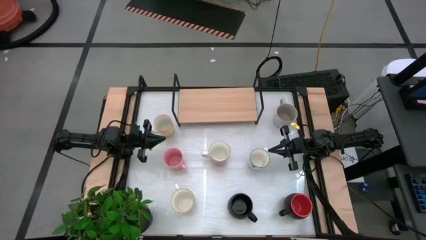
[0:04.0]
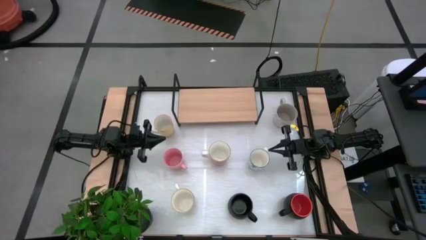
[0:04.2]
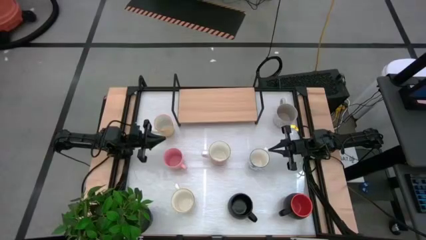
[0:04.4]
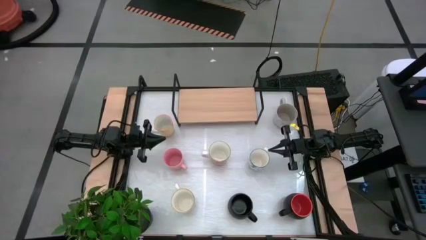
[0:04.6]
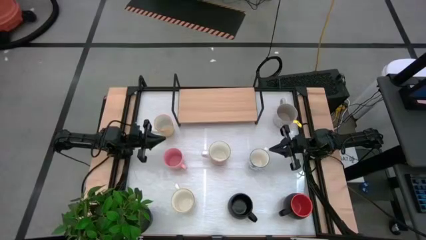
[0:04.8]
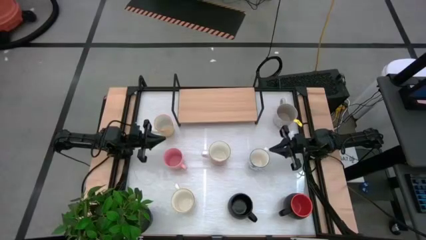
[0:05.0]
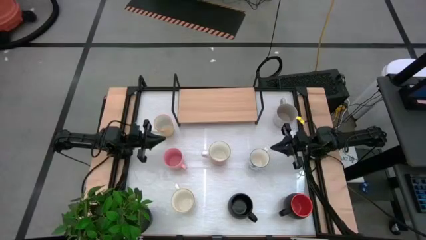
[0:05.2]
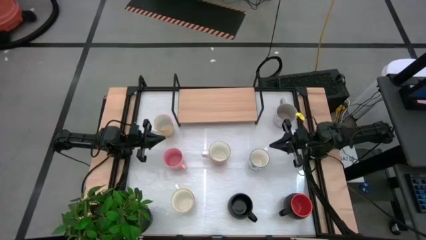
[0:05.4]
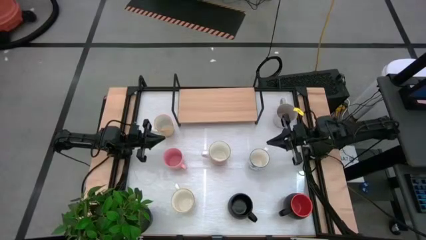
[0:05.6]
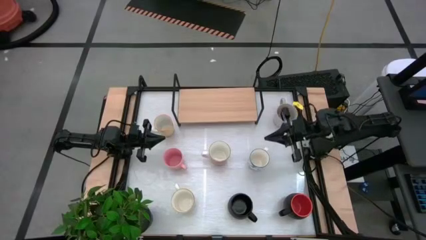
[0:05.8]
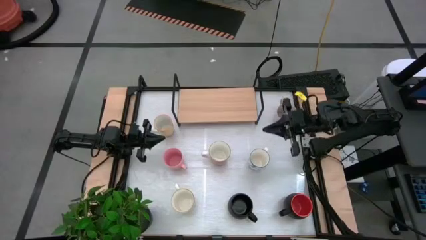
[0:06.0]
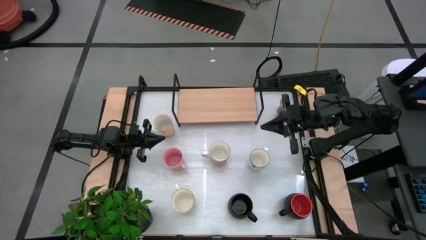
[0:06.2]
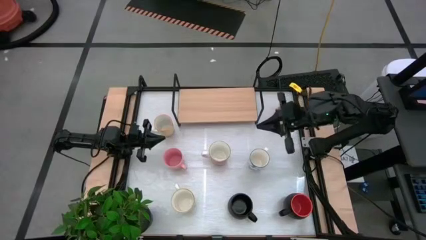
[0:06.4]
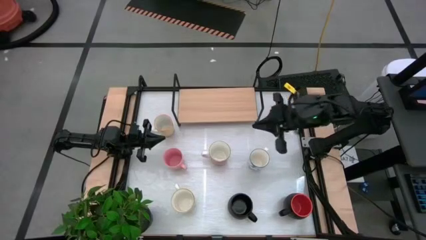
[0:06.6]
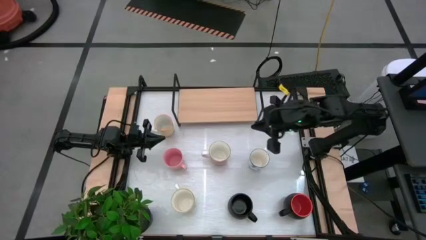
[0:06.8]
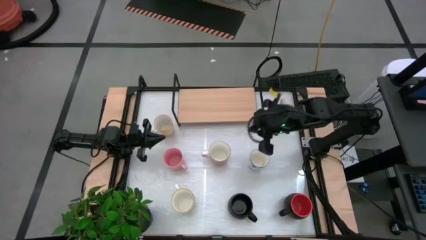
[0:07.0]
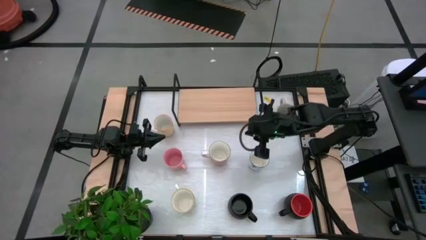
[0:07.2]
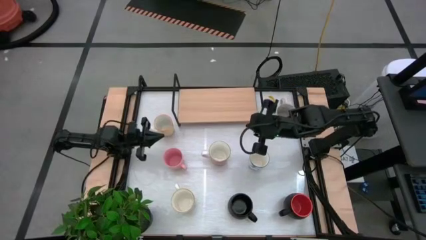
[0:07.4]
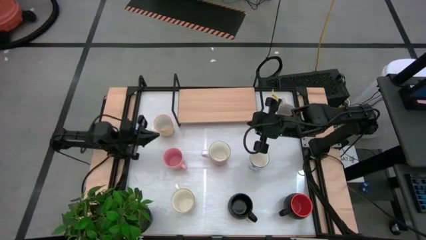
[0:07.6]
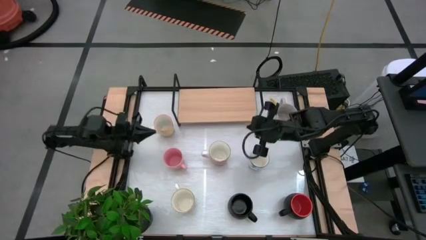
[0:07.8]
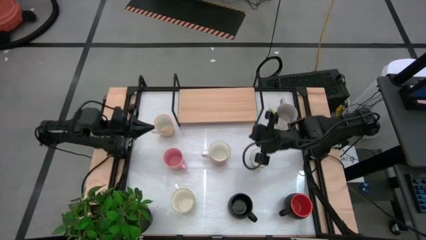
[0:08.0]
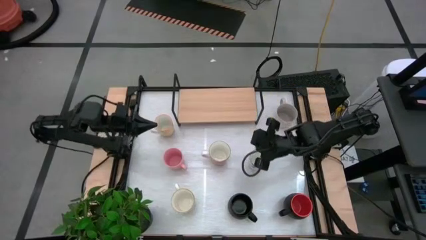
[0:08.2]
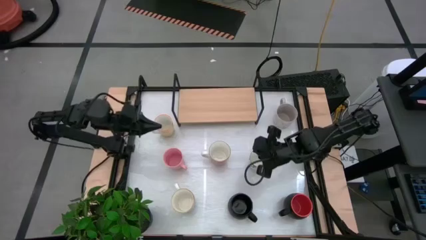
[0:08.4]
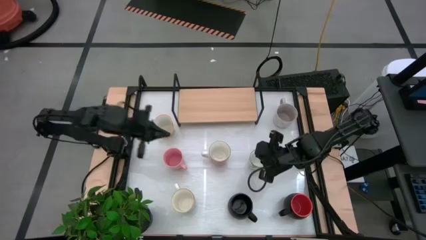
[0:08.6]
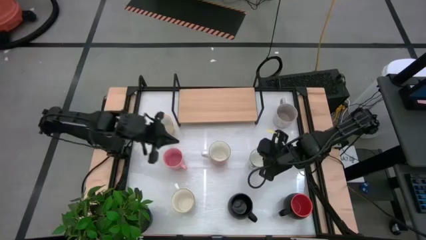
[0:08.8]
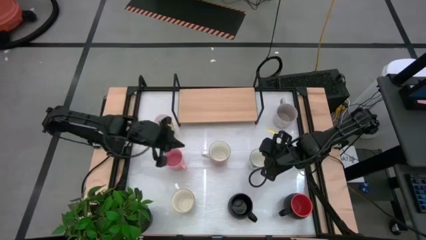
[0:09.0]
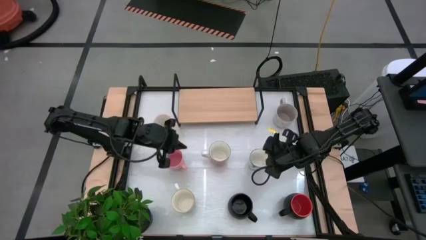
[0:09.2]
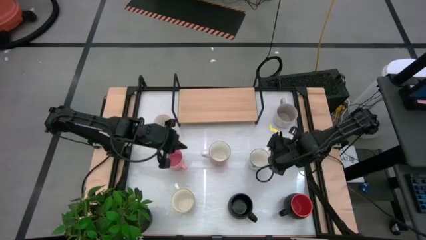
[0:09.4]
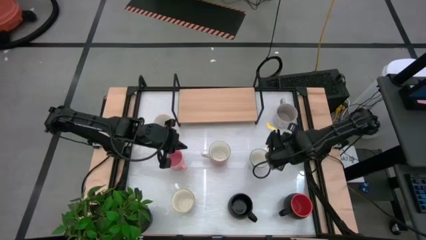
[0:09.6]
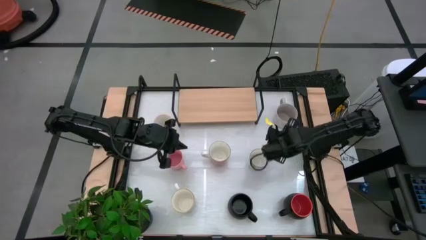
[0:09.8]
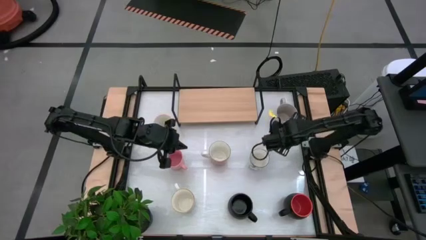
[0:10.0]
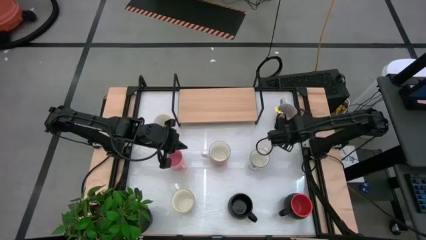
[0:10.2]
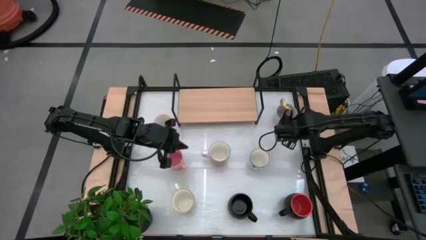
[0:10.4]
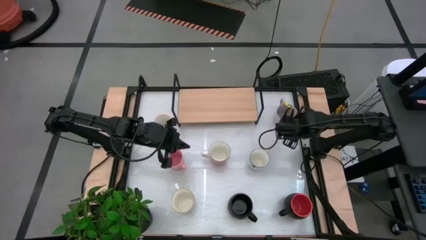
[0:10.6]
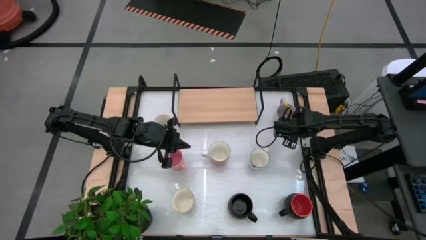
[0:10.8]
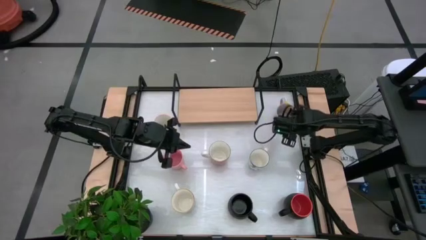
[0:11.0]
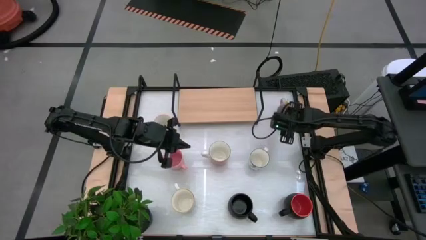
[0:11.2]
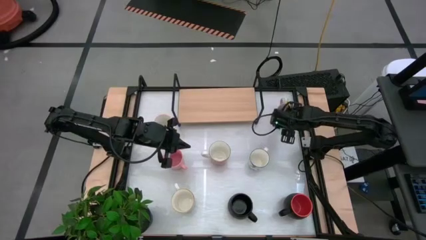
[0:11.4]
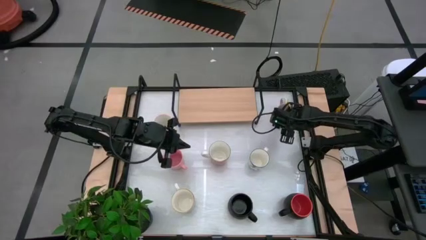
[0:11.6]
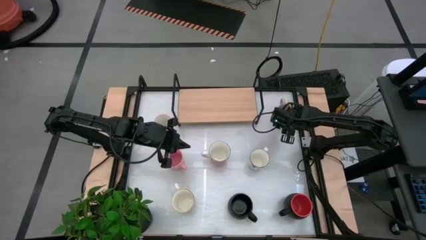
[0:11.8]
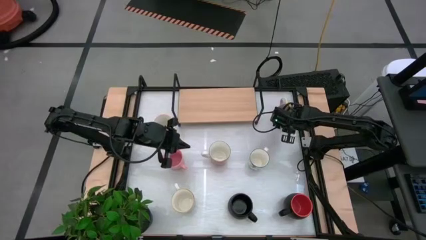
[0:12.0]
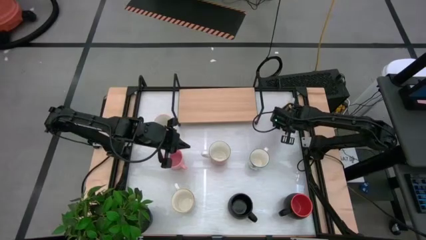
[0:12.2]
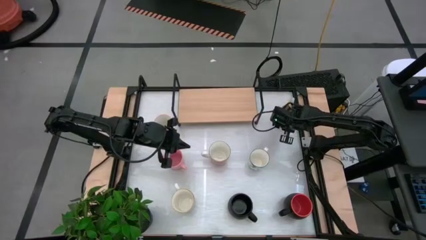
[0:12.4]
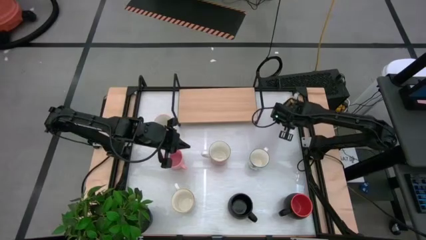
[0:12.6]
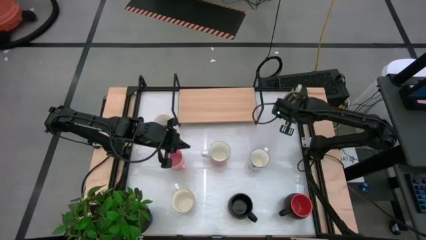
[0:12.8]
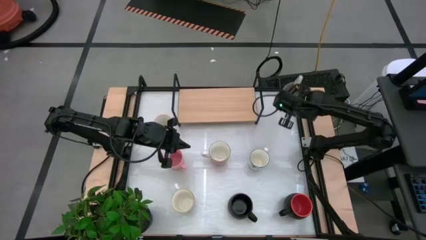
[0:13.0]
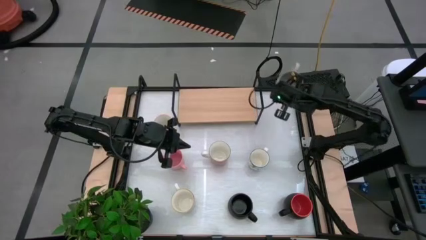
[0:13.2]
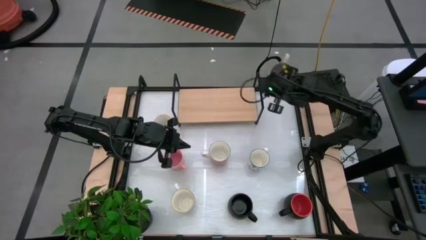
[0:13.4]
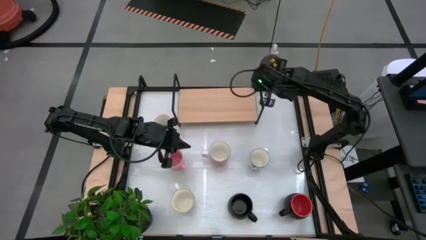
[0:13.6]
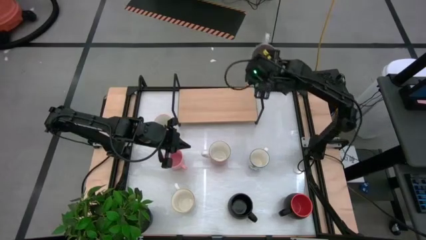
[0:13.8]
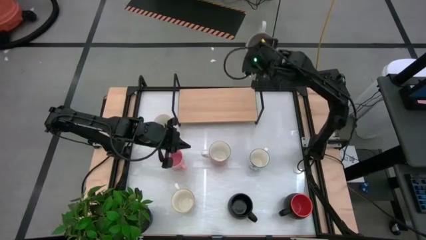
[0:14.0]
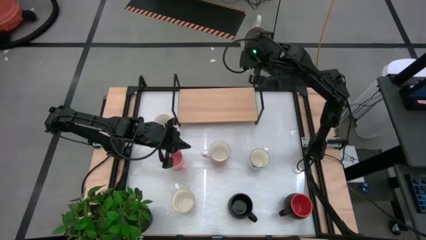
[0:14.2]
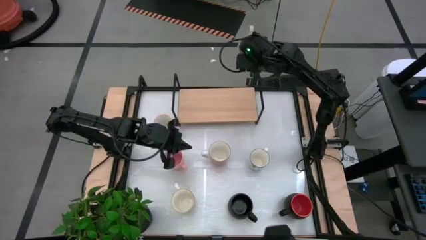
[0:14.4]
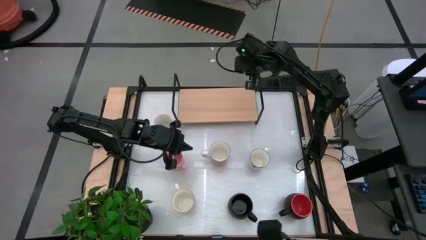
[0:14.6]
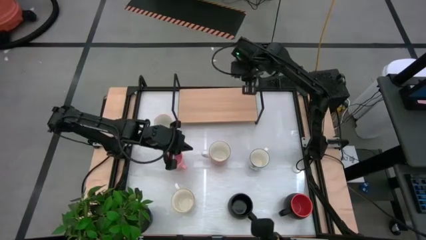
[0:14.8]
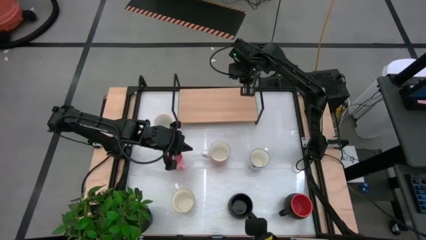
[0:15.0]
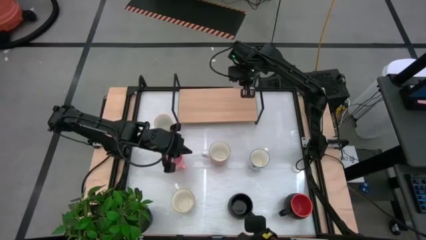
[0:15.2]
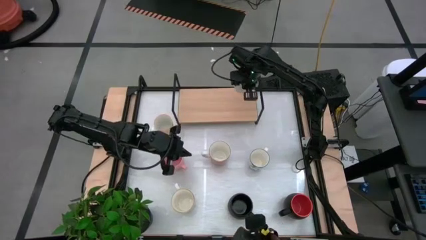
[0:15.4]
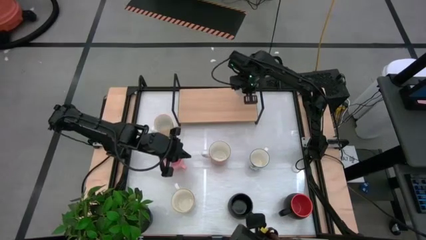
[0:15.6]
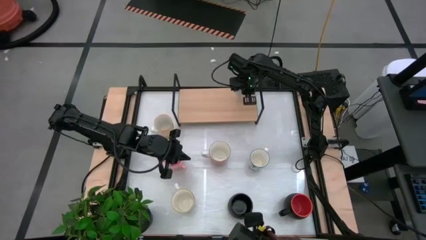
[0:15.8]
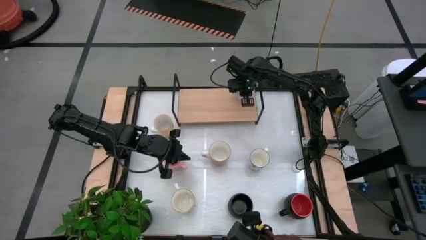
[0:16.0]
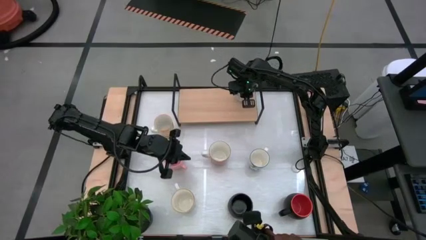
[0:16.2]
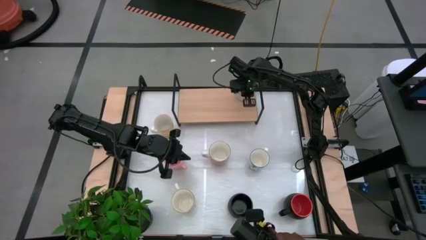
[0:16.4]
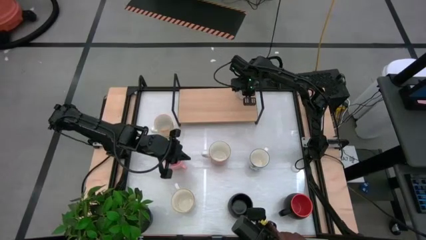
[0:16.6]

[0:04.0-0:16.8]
Task: Place coffee mugs
Put the gray mug on the shelf
